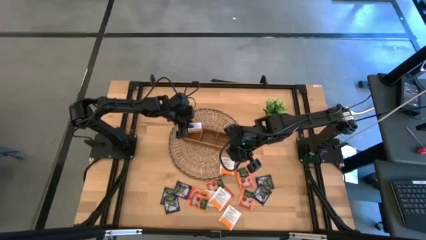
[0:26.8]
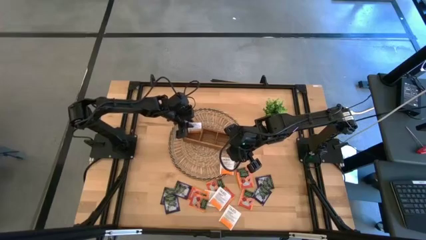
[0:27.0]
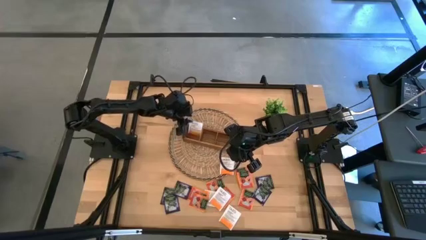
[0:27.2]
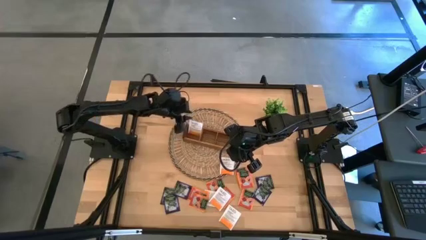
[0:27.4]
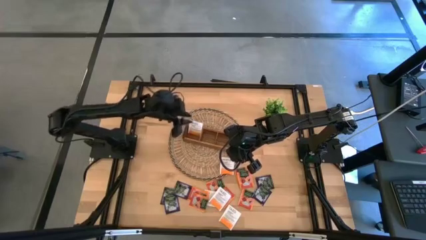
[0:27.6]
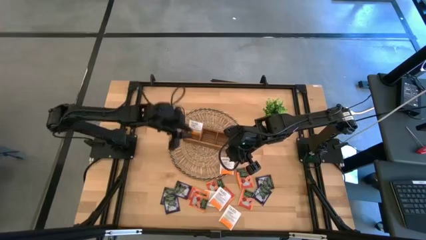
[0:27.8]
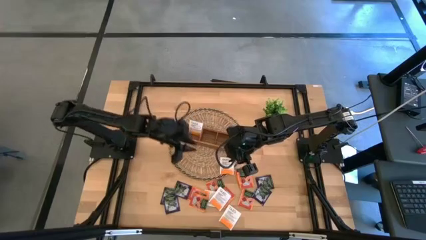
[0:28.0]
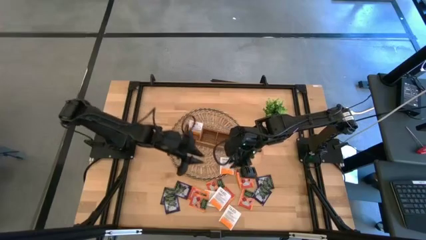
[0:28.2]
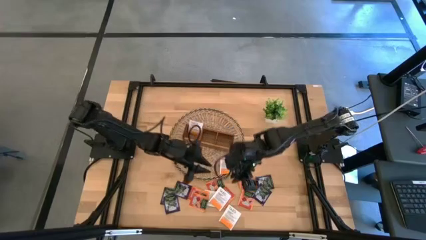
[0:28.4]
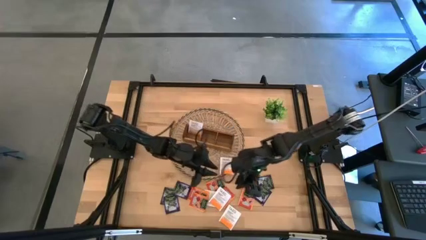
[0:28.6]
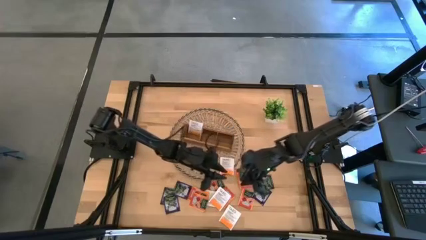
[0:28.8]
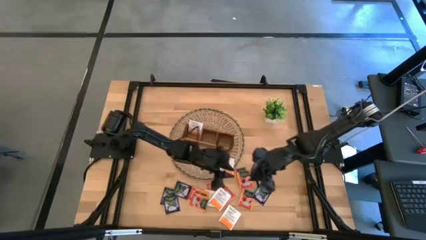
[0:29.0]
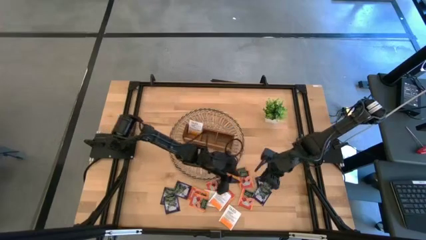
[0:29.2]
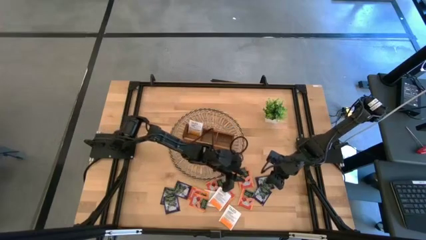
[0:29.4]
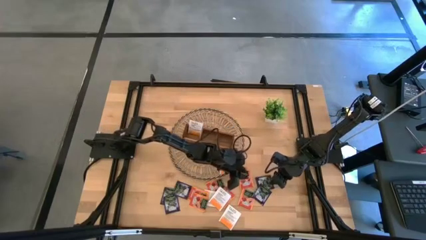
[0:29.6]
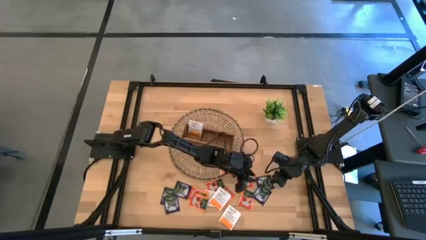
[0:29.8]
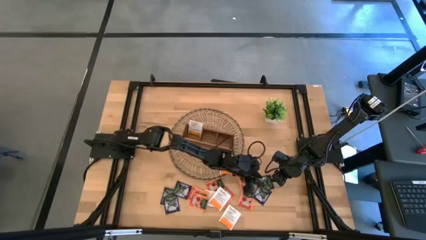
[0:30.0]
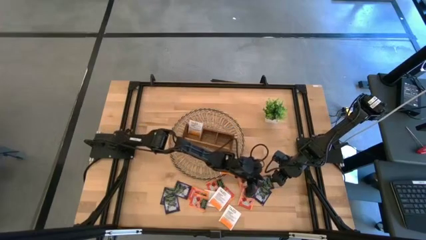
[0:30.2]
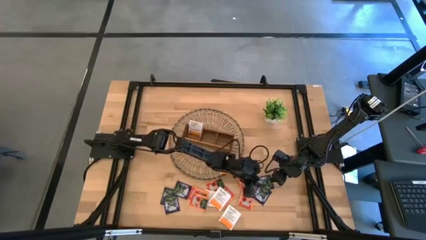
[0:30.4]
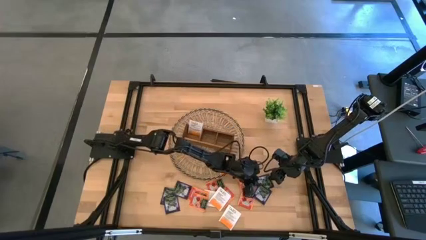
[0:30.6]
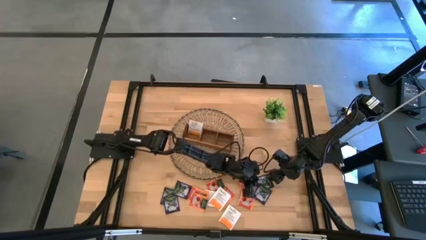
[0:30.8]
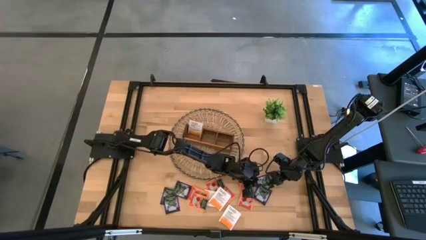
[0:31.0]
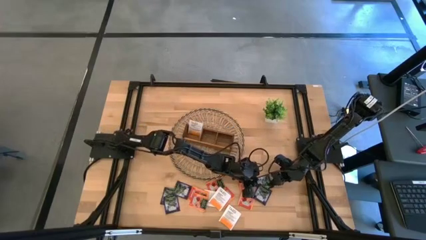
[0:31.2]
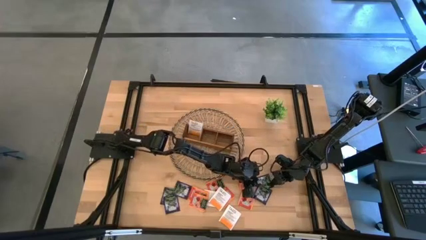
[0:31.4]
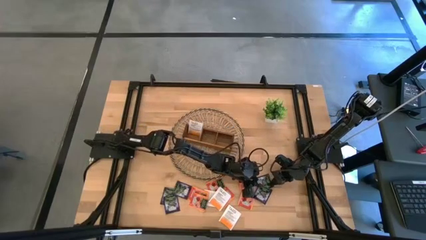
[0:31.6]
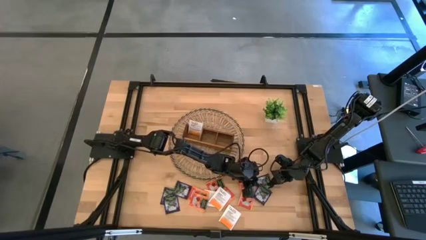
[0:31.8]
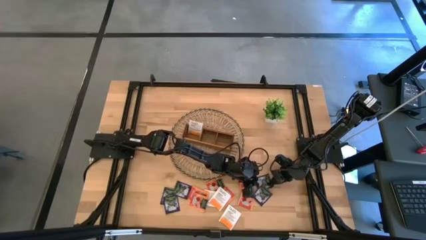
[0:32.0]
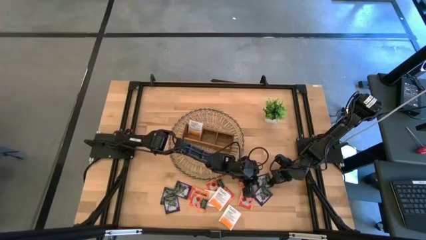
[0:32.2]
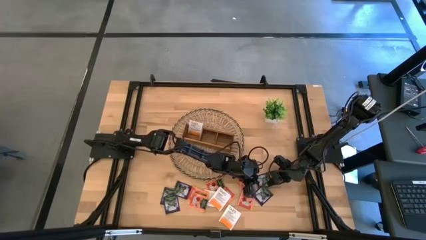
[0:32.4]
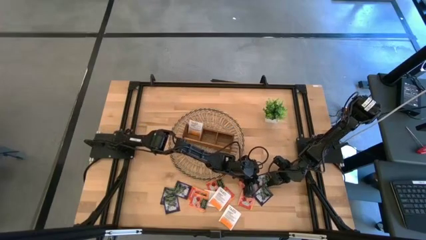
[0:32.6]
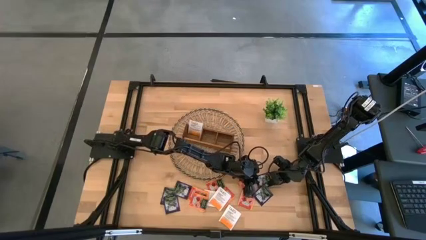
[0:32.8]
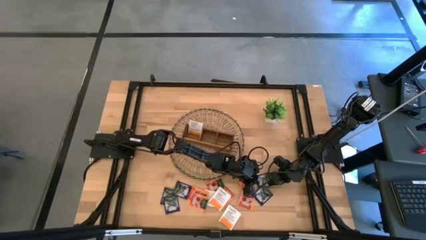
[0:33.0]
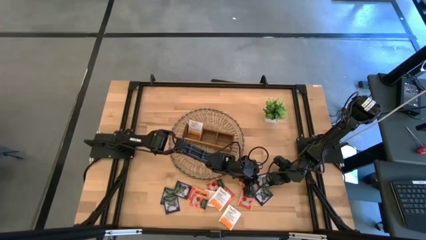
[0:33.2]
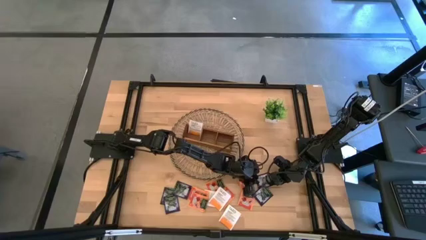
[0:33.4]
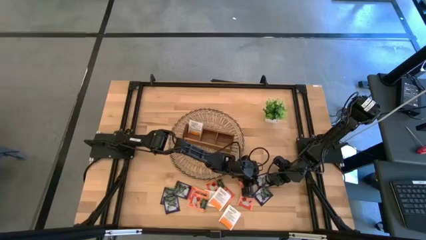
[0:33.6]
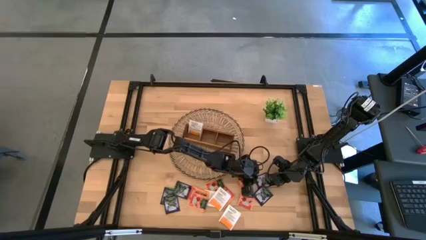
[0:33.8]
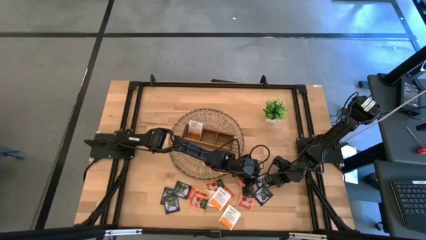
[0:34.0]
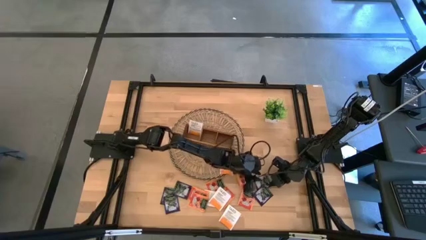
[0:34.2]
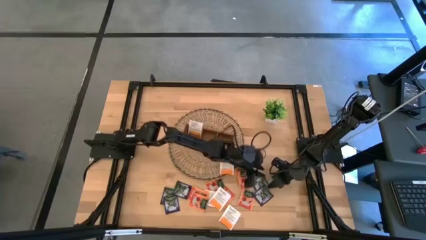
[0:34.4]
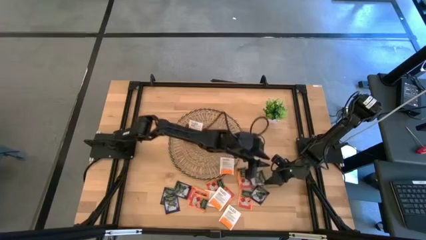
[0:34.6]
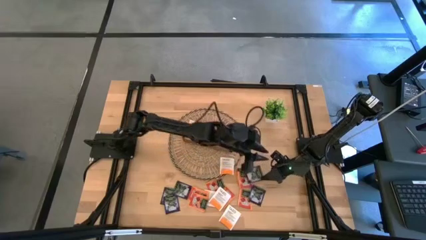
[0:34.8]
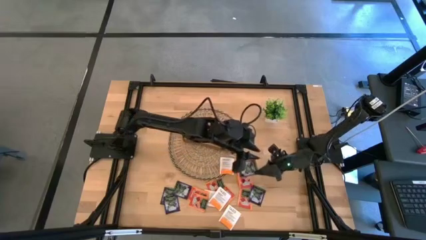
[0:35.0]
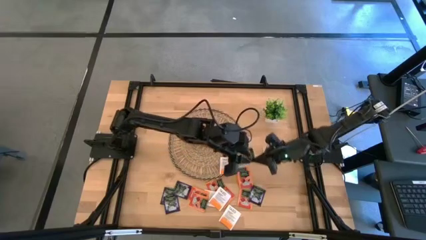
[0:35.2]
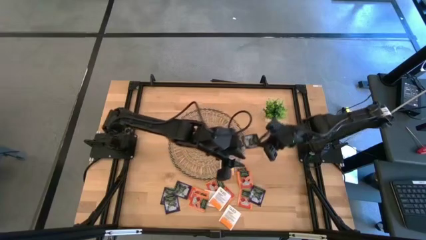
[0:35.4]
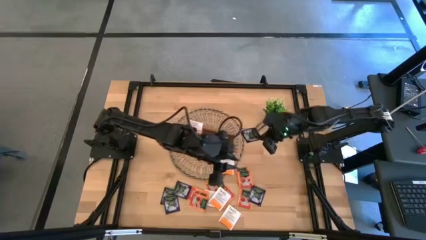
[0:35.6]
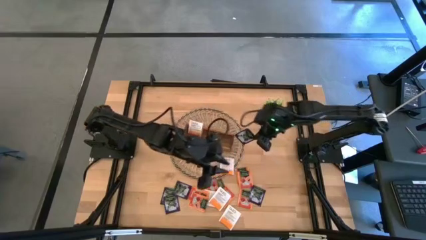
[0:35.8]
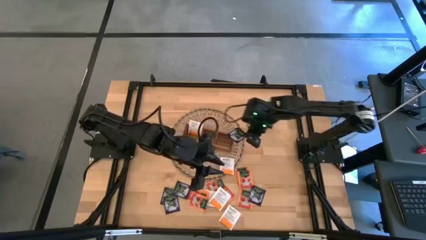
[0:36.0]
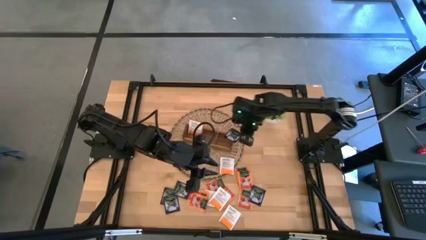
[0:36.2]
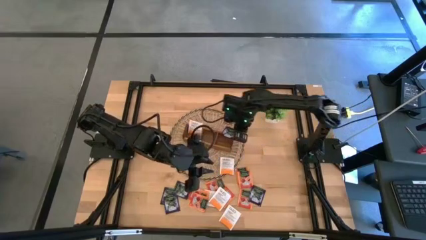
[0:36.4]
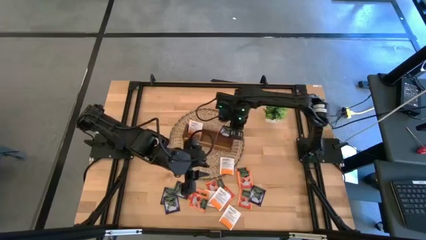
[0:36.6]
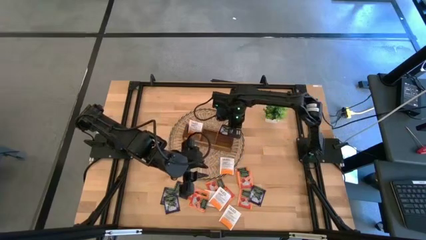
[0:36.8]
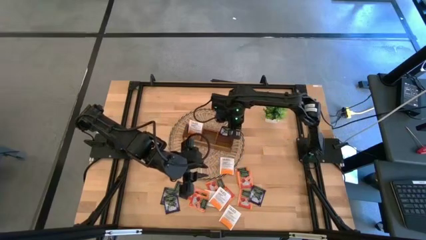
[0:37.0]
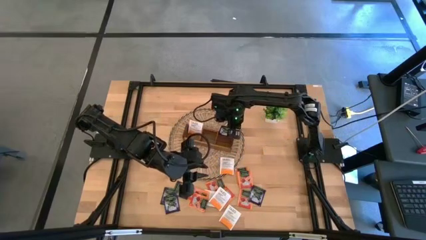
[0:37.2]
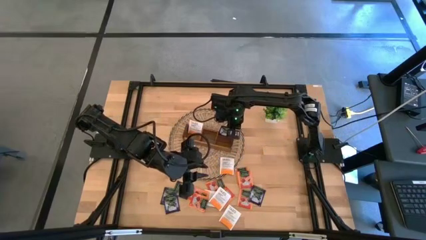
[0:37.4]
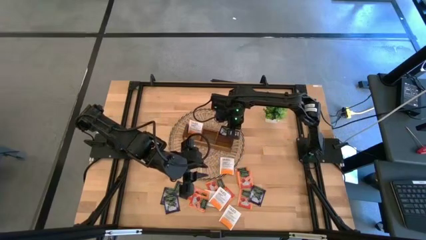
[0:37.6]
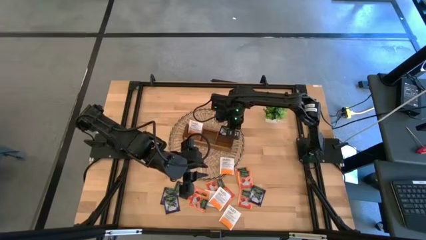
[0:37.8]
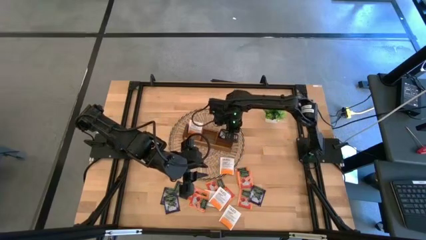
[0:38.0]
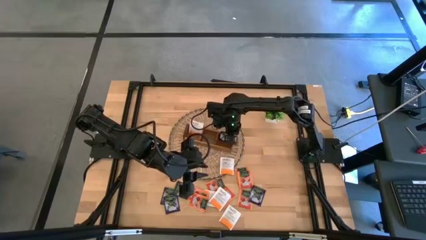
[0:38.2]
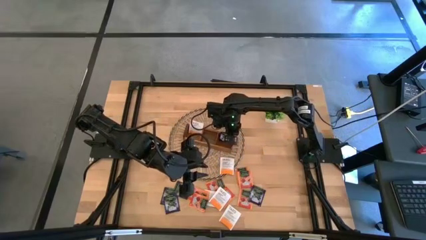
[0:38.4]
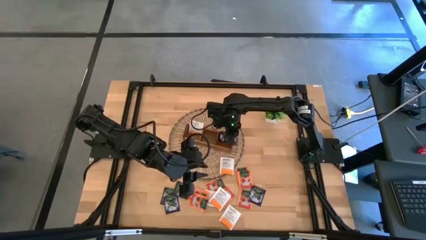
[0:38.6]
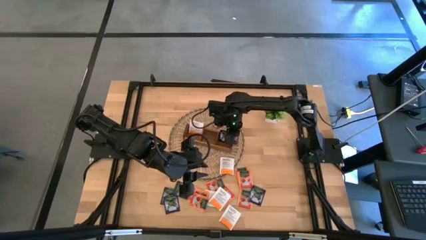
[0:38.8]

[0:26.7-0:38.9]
Task: Pick & Place Tea
Put the purple tea bag into the right section of the wooden organizer
